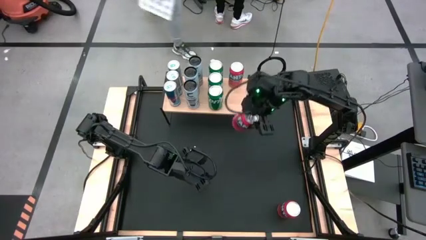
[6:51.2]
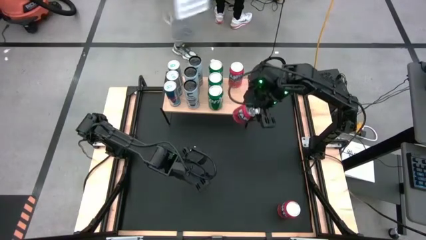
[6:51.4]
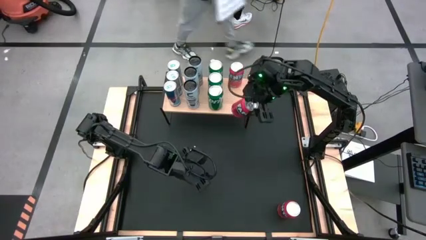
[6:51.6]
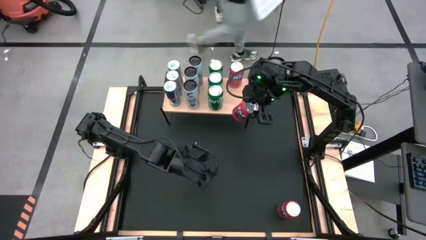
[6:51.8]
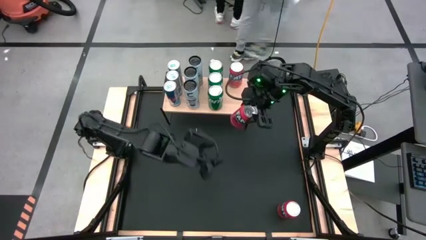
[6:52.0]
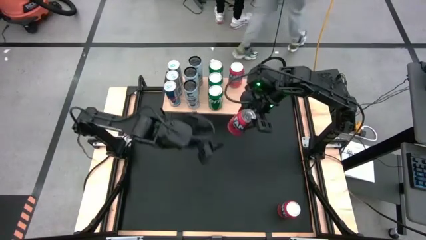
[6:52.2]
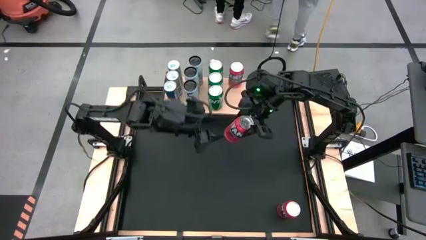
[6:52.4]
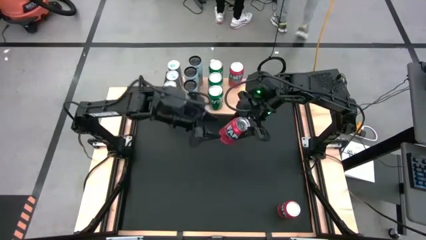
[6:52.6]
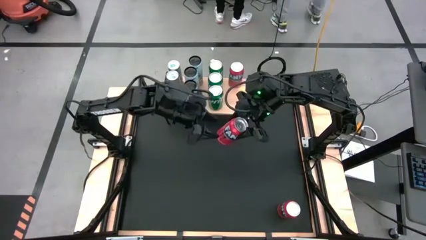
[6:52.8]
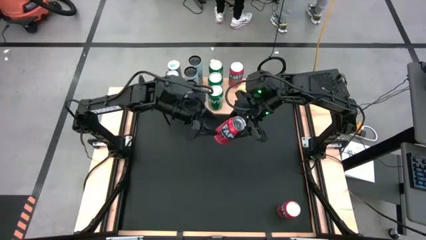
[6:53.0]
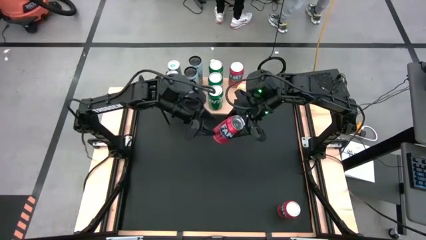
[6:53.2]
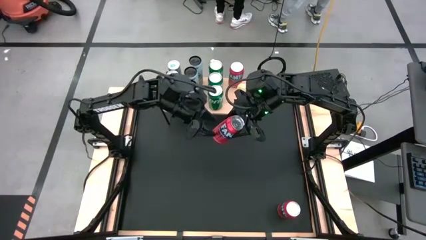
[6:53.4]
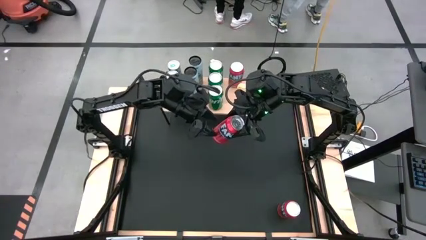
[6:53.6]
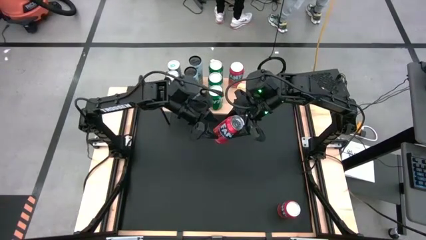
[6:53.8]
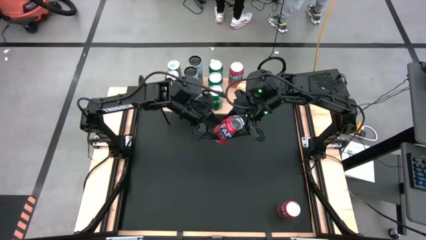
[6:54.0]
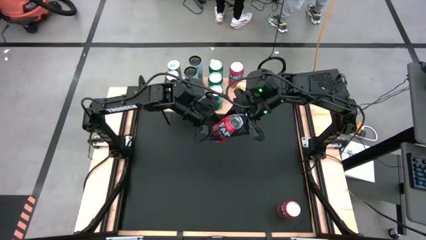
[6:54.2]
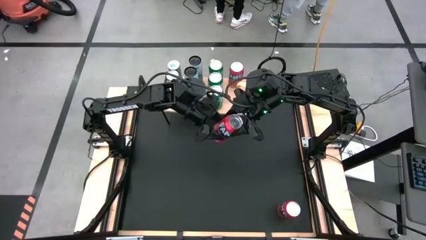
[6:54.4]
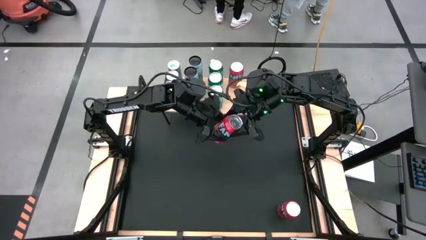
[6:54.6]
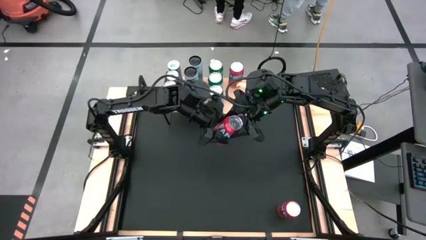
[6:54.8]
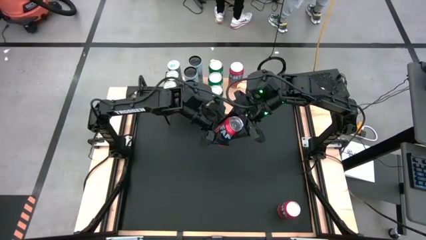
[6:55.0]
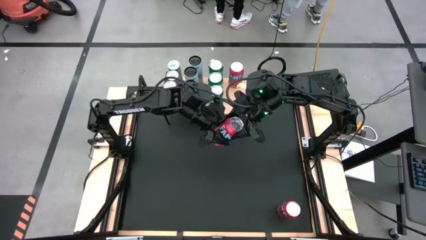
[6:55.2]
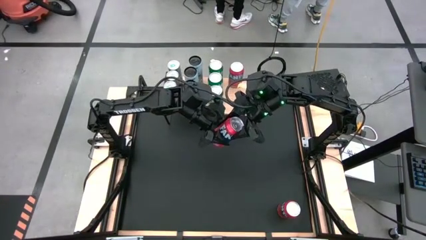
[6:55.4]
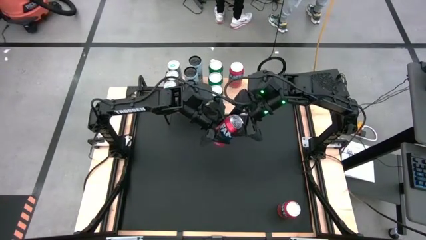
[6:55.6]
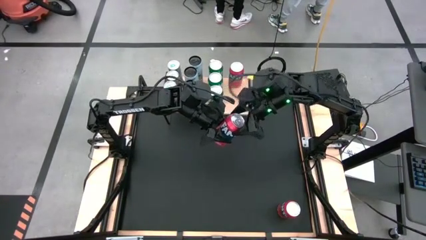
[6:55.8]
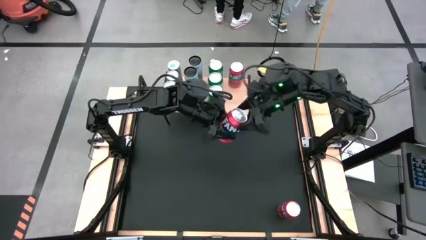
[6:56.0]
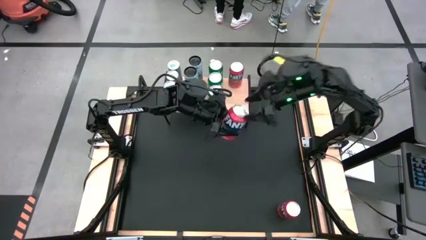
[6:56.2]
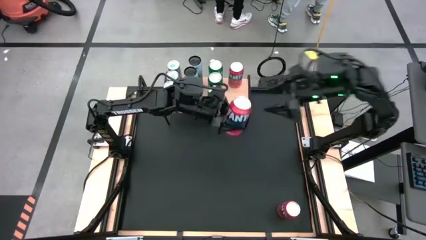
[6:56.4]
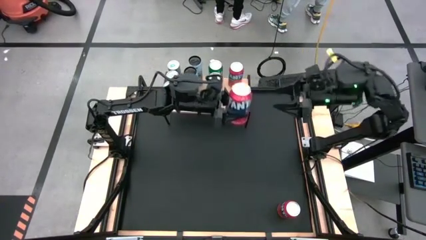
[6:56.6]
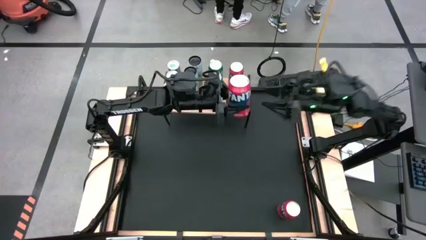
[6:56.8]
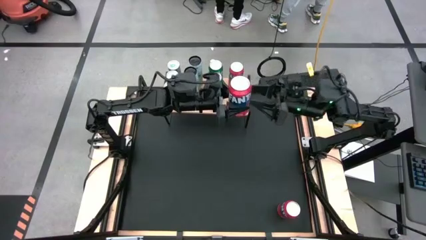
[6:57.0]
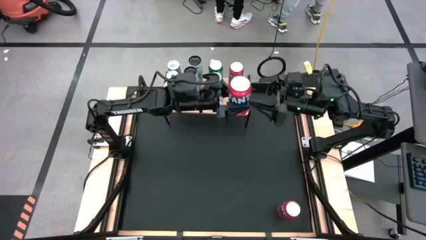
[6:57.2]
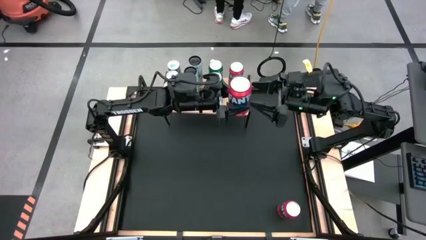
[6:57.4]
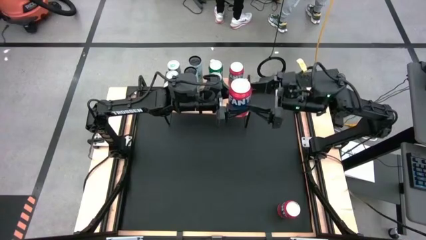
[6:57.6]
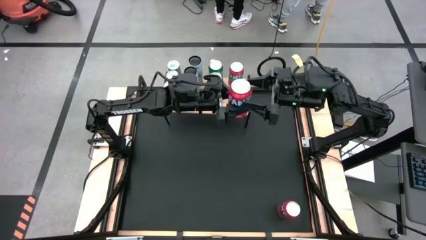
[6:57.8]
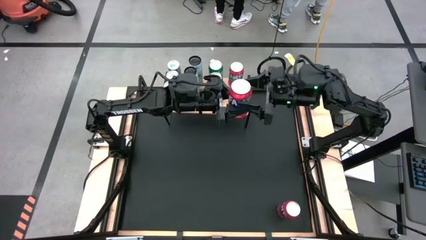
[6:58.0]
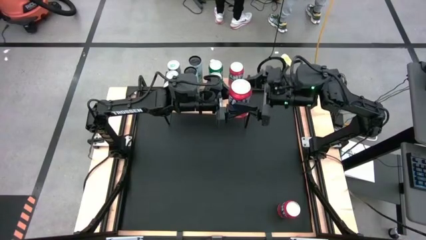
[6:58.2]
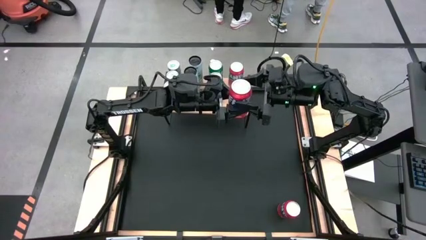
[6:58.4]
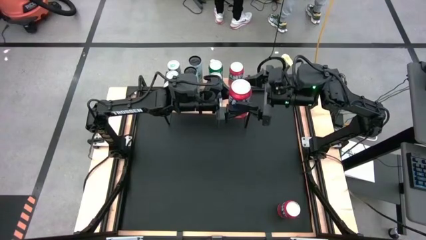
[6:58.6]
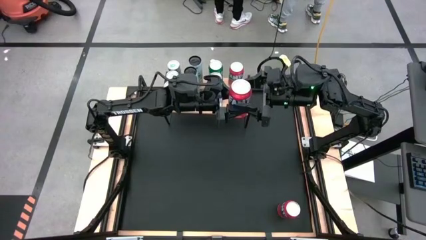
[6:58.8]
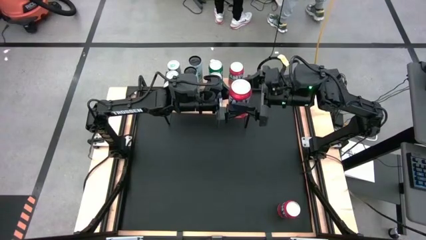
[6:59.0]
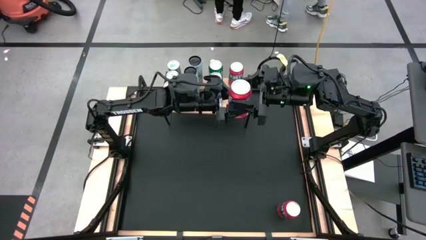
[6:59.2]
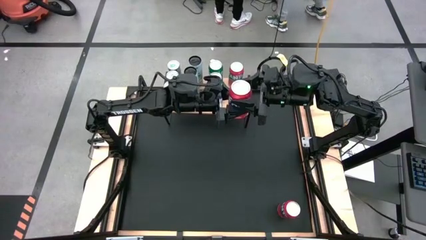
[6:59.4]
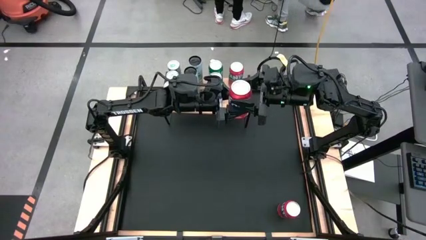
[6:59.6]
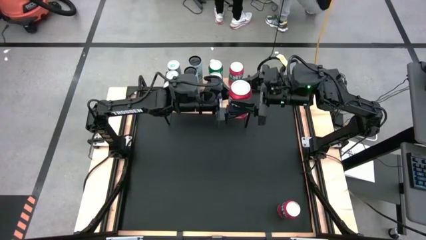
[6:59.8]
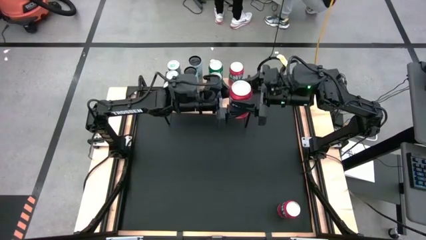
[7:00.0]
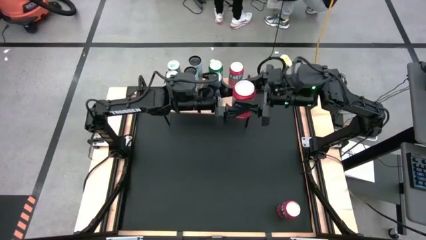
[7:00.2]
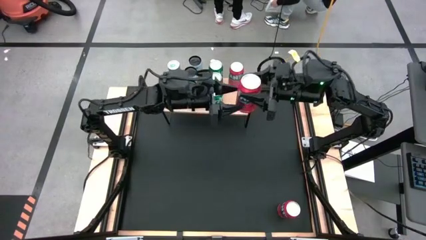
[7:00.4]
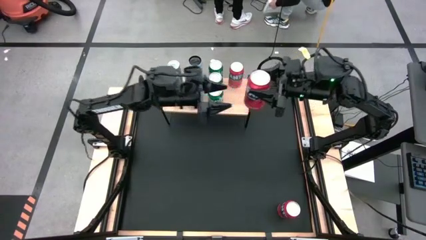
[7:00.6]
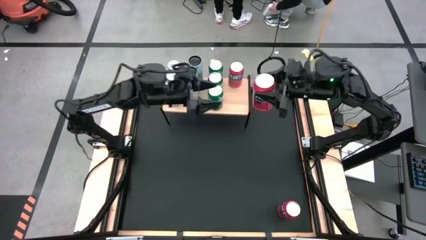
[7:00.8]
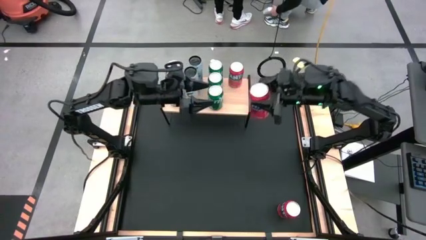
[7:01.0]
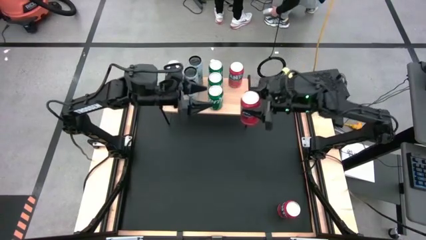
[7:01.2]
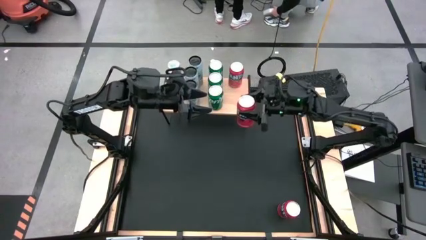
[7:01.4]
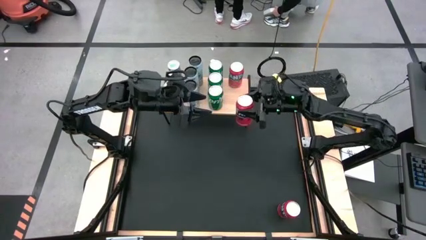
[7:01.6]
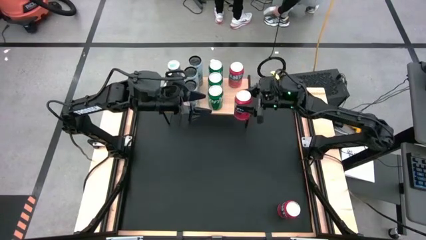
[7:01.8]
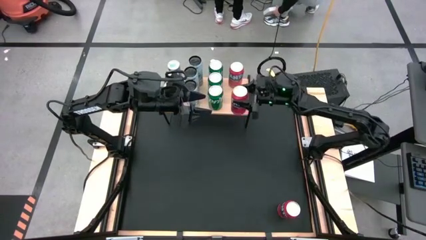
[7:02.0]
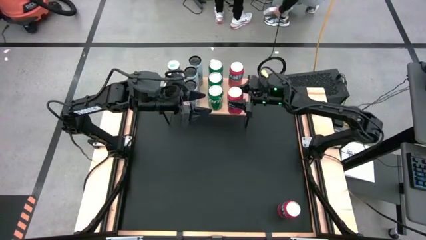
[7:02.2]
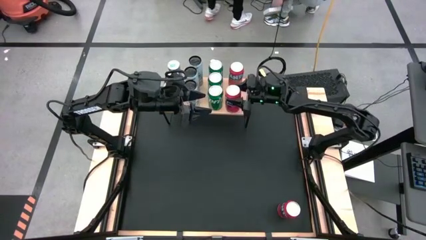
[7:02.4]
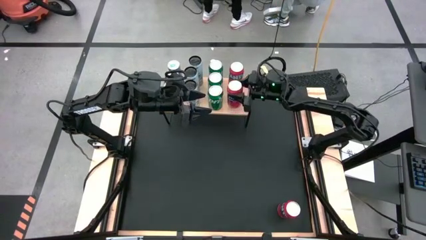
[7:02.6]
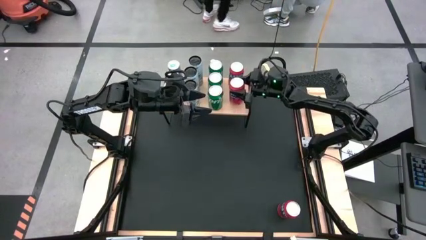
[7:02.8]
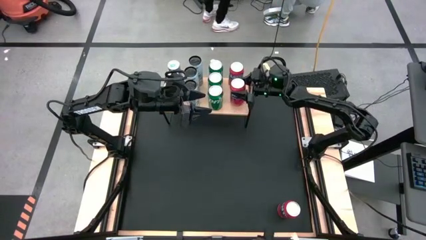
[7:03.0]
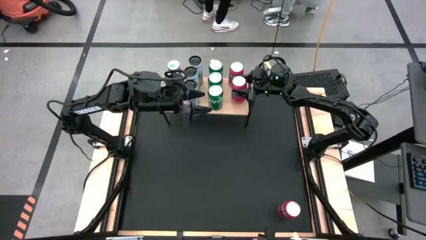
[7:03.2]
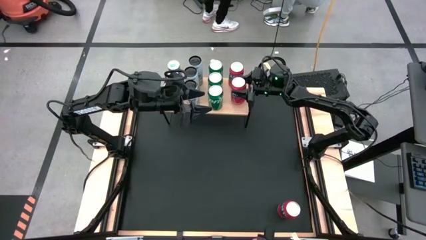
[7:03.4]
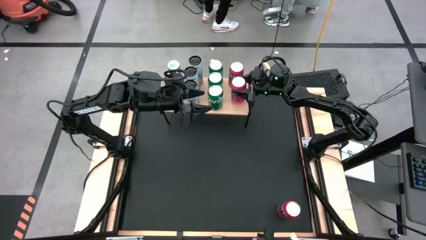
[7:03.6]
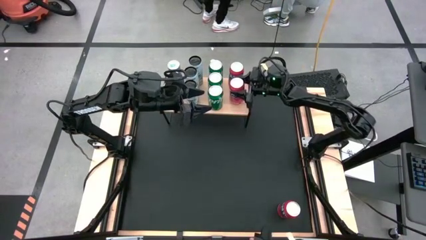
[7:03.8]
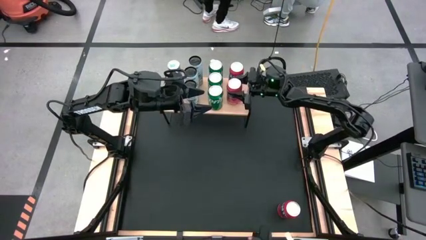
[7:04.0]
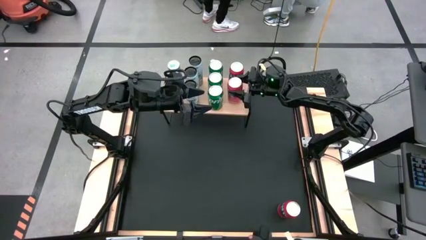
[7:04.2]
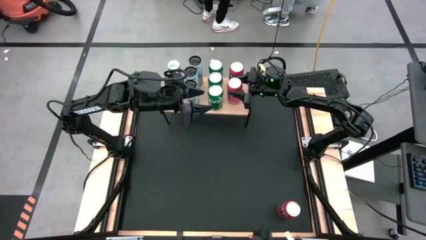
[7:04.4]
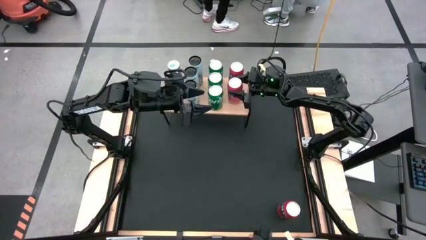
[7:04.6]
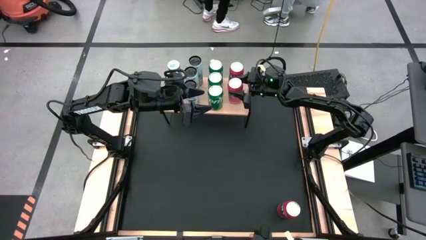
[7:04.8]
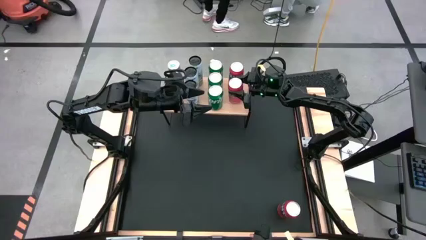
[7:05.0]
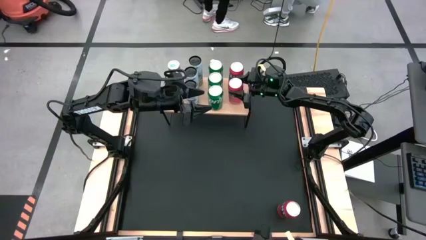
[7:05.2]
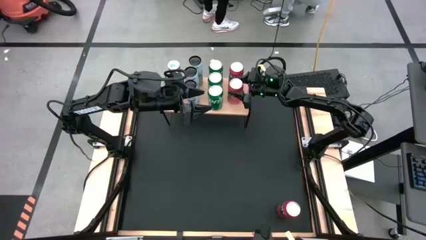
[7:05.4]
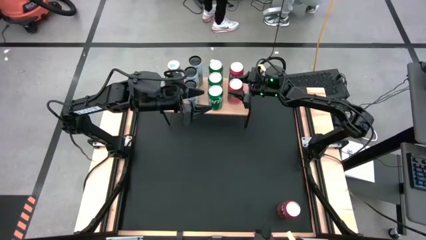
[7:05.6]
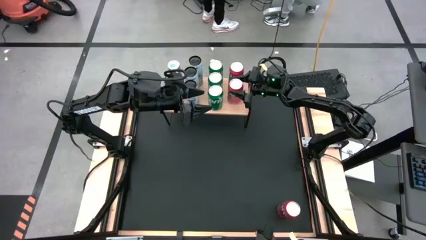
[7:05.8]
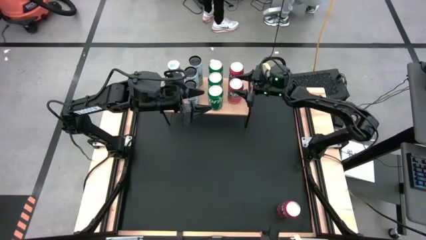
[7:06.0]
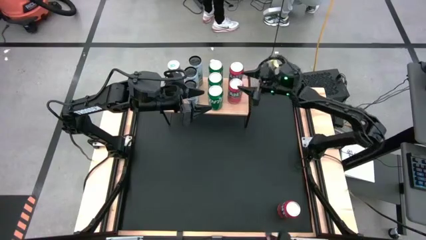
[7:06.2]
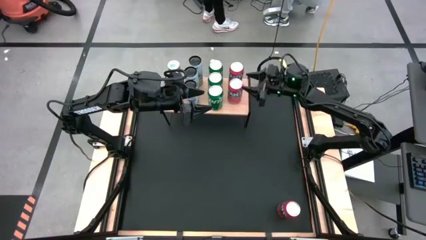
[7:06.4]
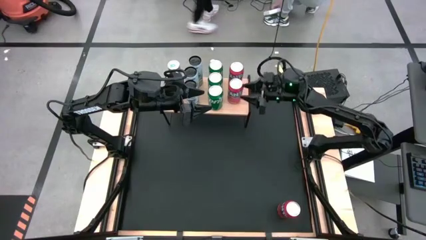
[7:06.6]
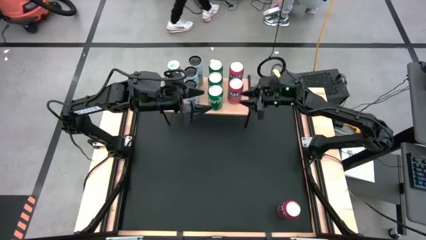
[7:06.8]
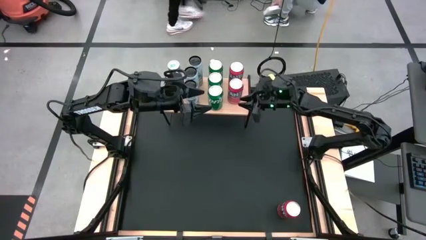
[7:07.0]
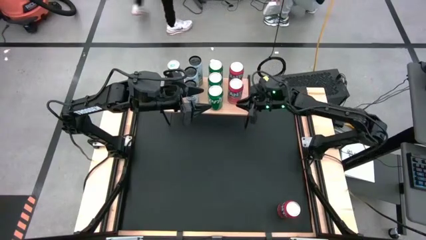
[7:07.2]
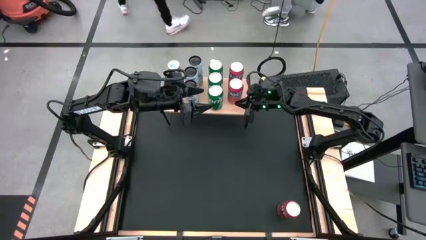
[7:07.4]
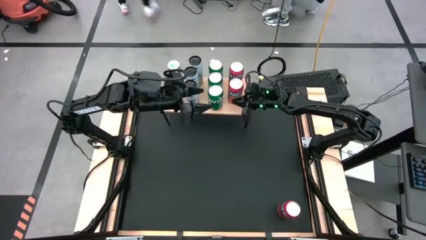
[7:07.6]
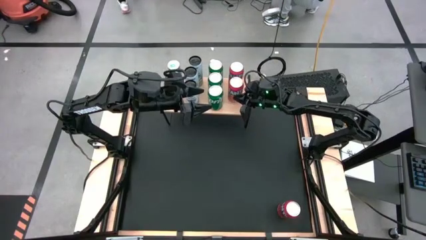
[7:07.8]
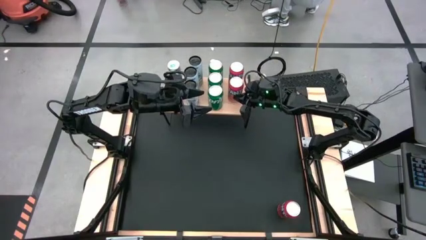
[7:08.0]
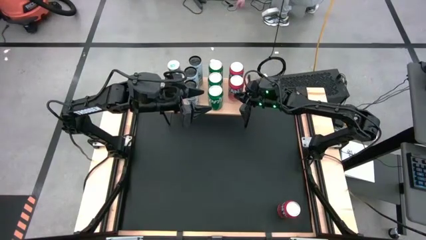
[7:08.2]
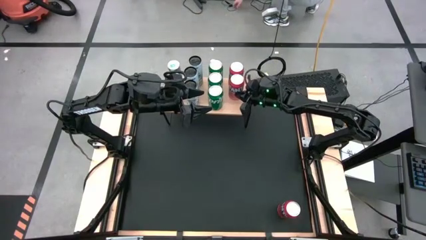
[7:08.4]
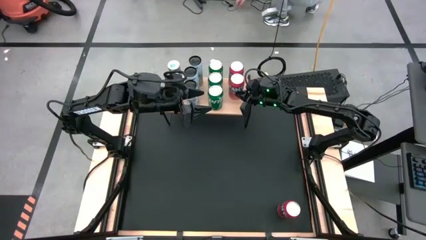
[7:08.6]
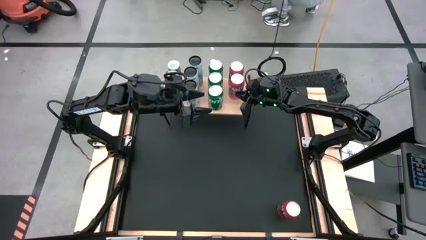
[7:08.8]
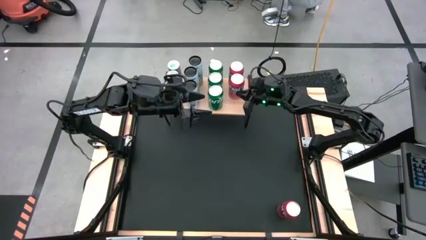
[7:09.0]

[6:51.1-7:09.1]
Task: Place canned beverage on shelf
Put the top orange soda can on the shelf
